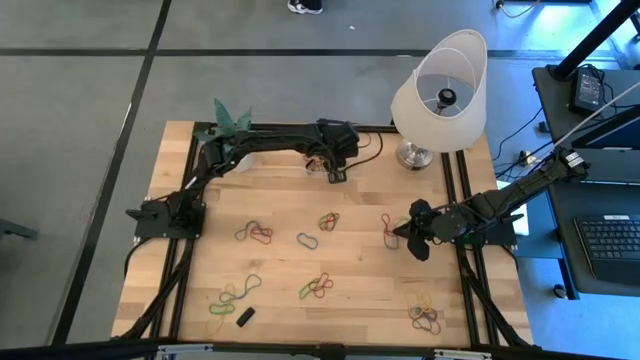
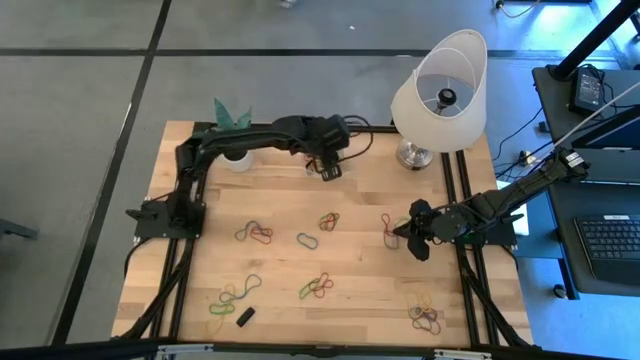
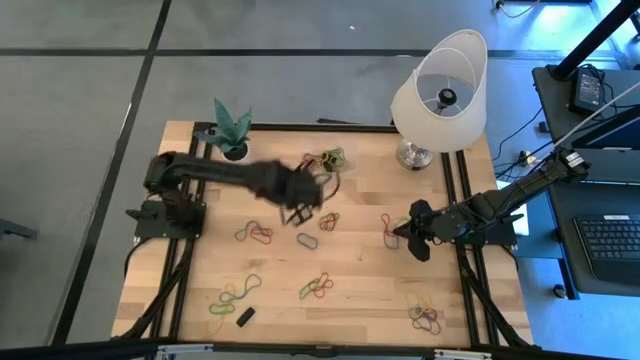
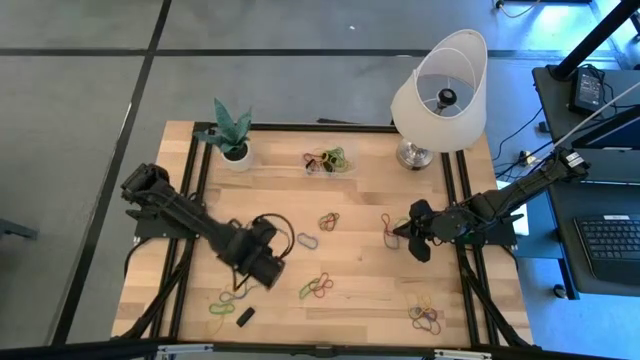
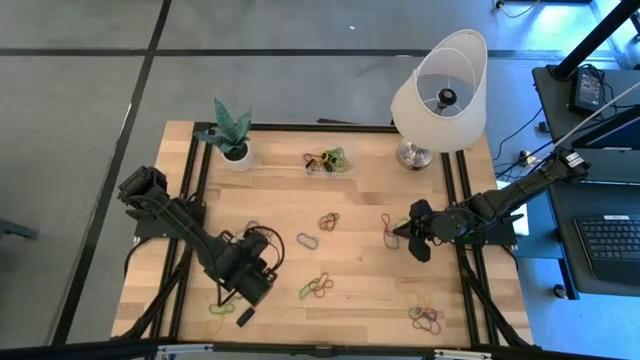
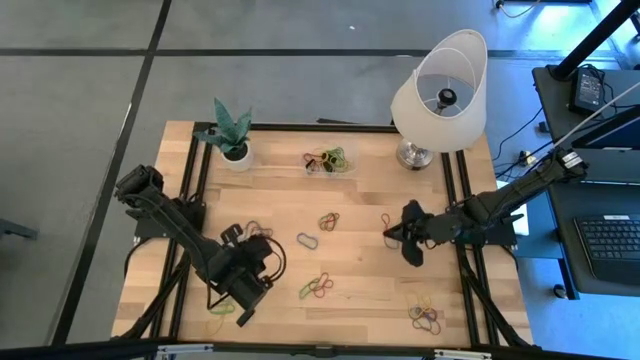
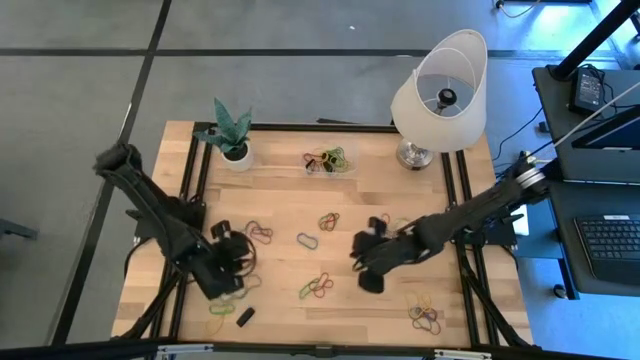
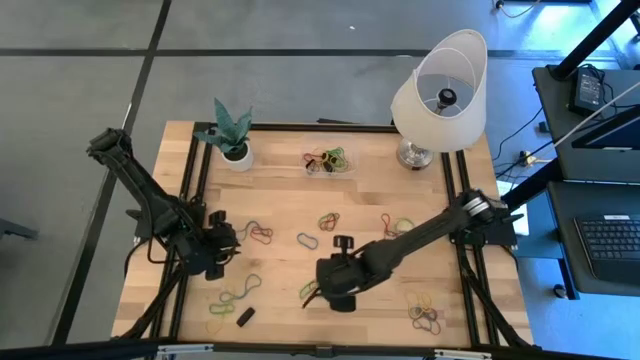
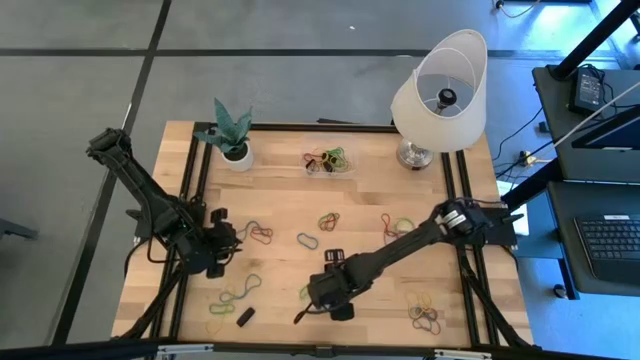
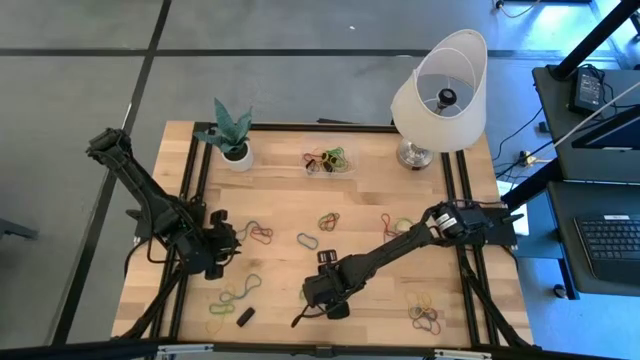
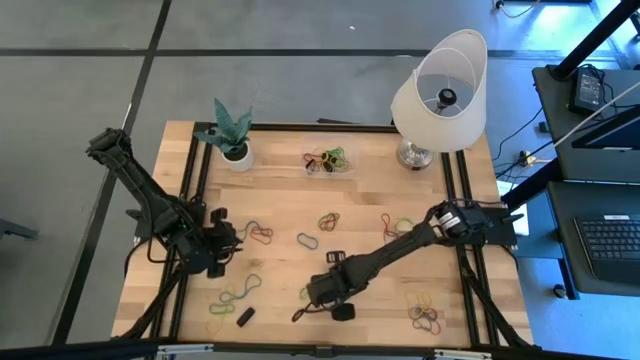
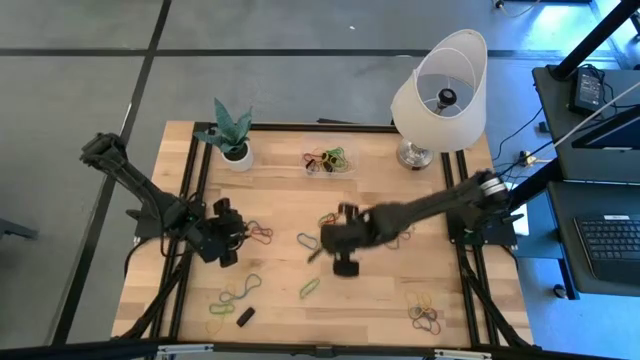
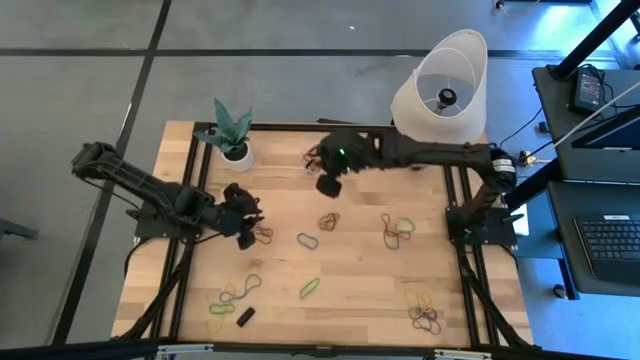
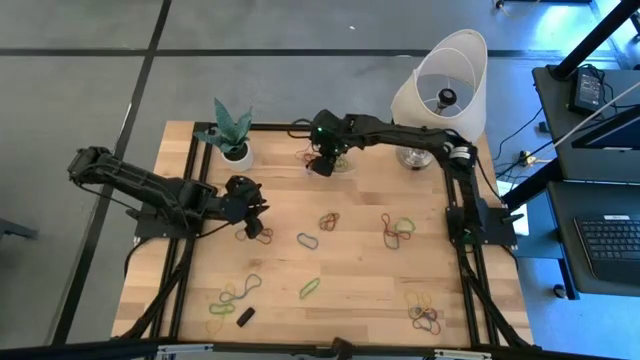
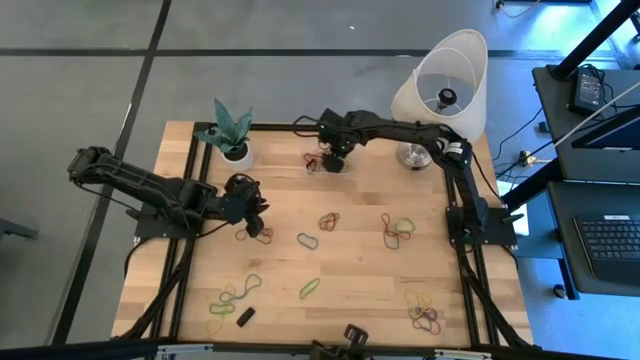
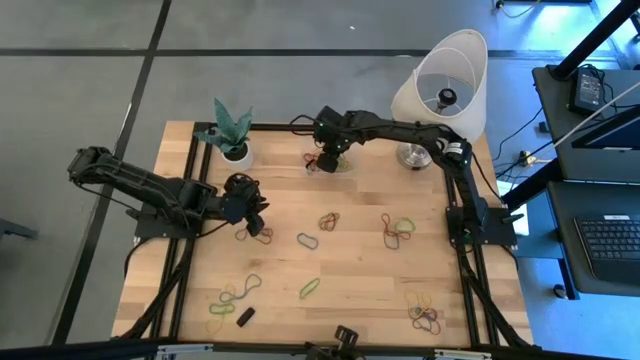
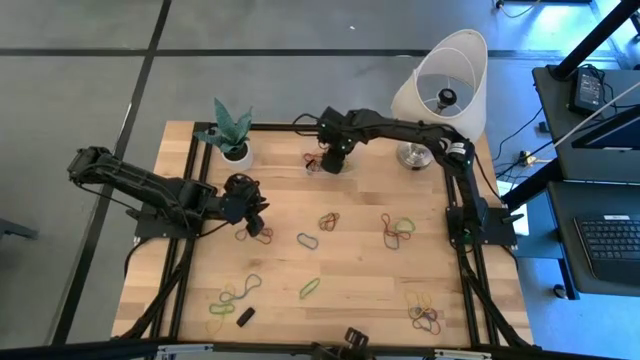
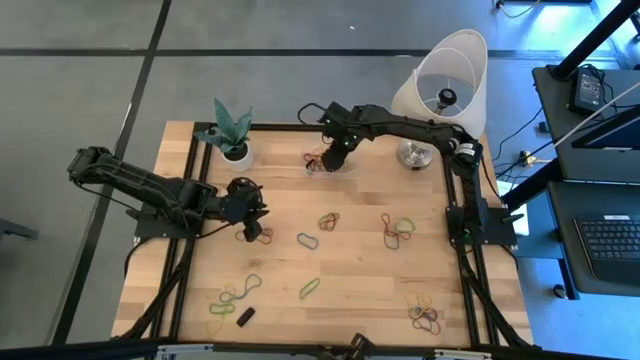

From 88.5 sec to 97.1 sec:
Task: Pick and place rubber bands into bin
Put the red rubber band into the transparent bin

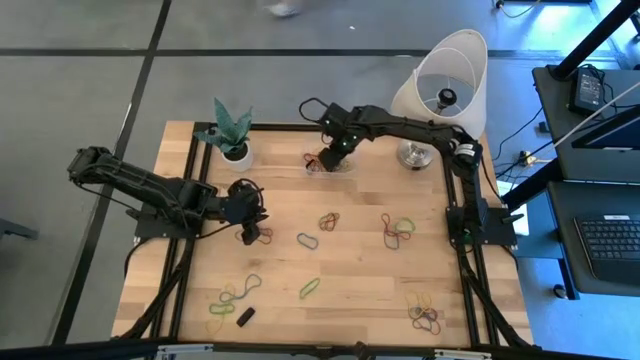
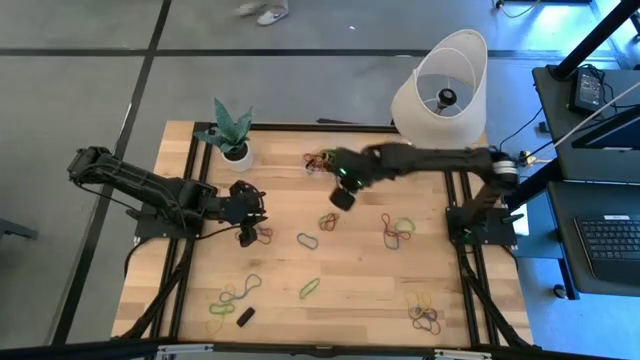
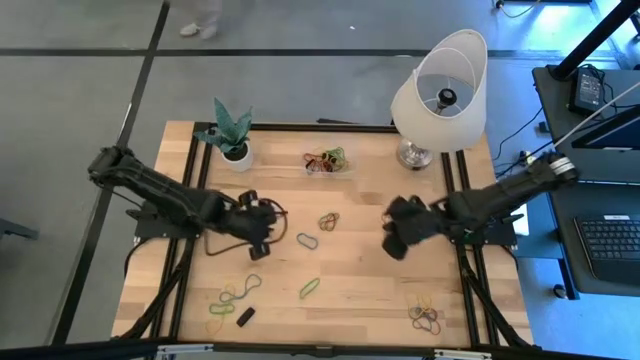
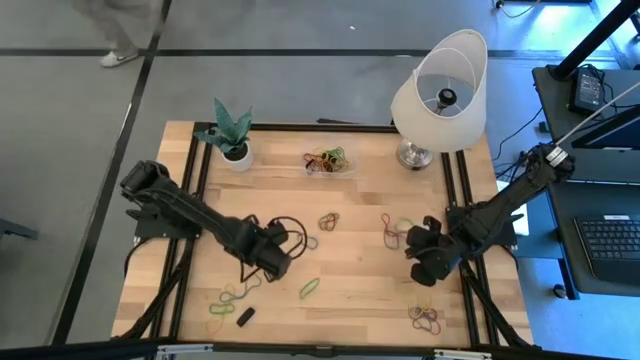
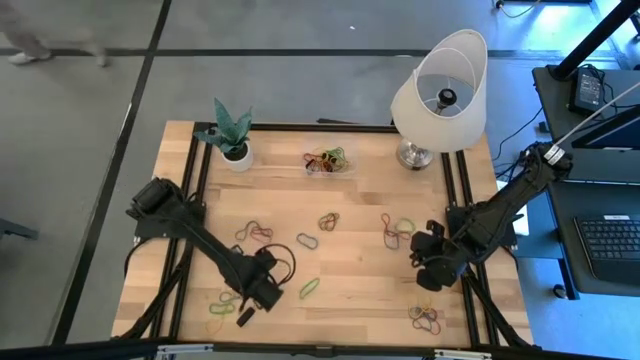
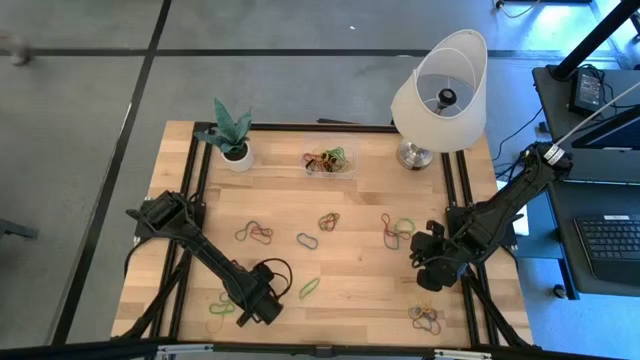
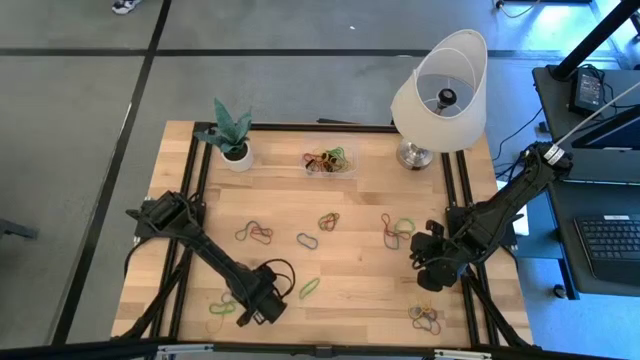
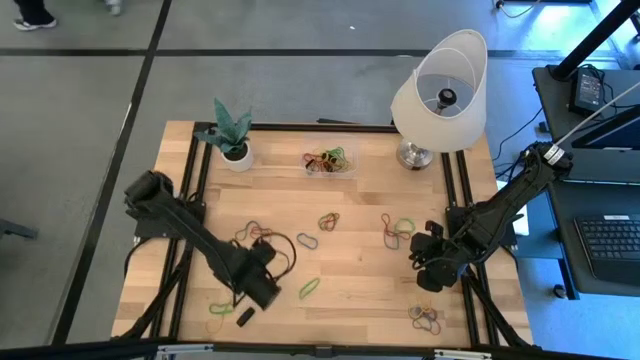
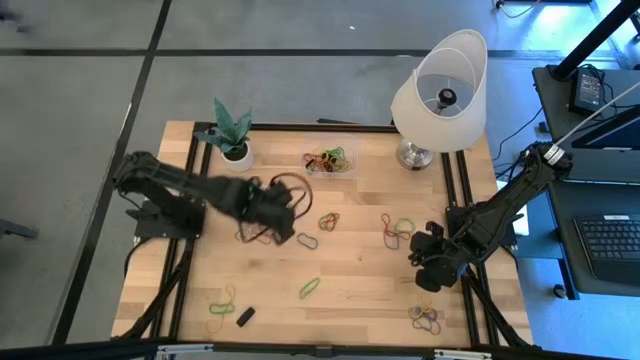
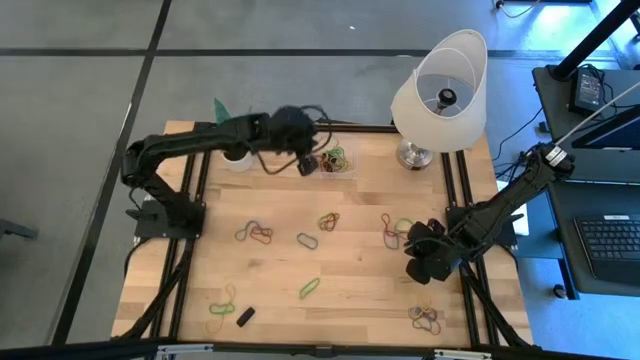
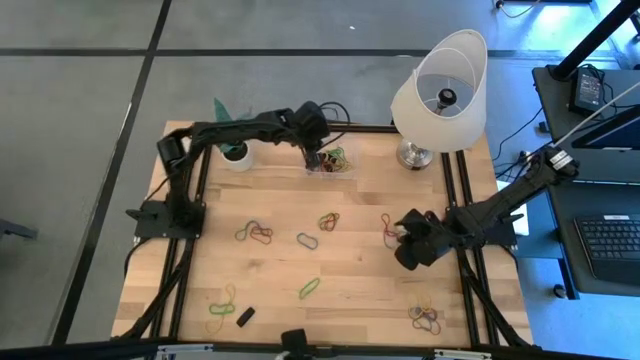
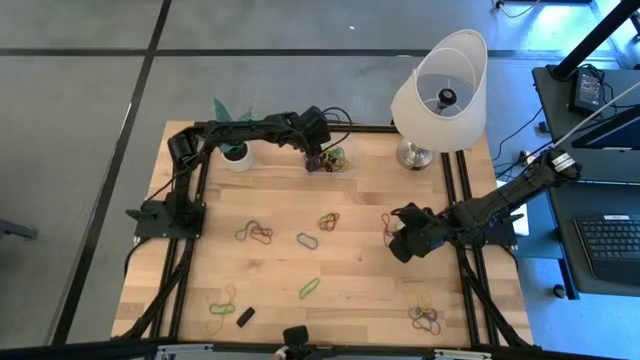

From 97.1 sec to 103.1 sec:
Put the blue rubber band into the transparent bin

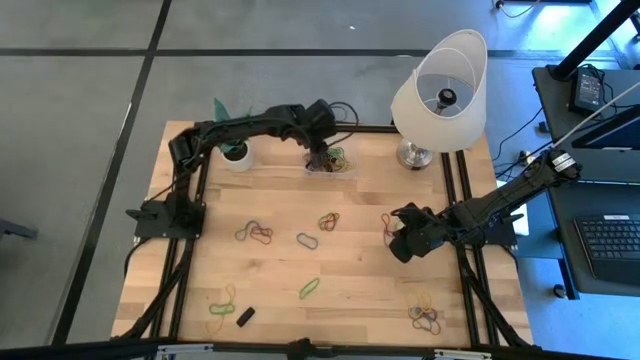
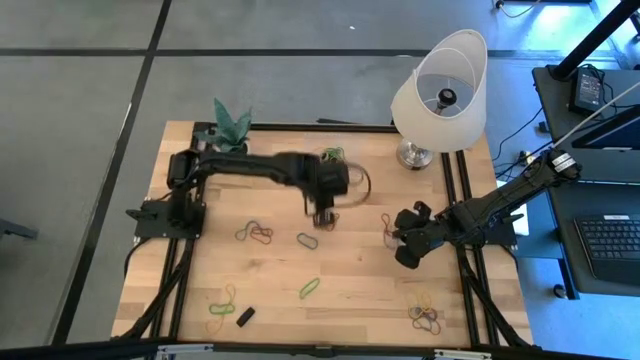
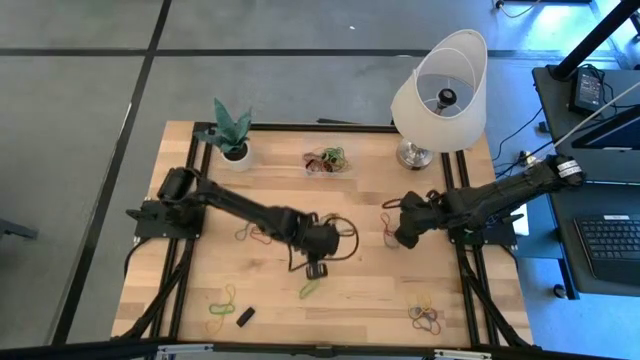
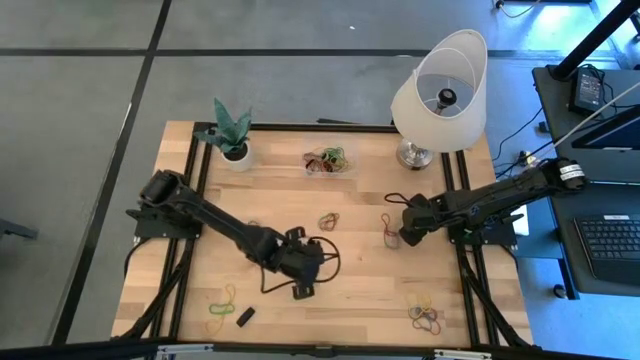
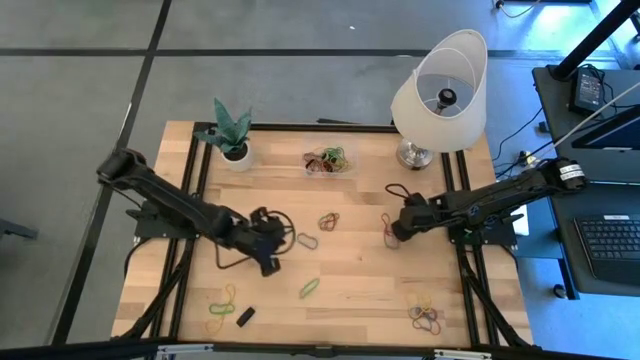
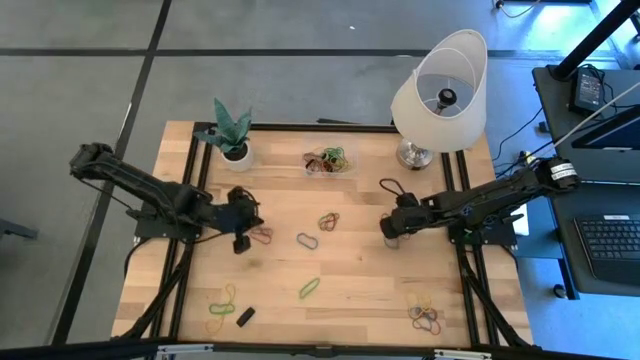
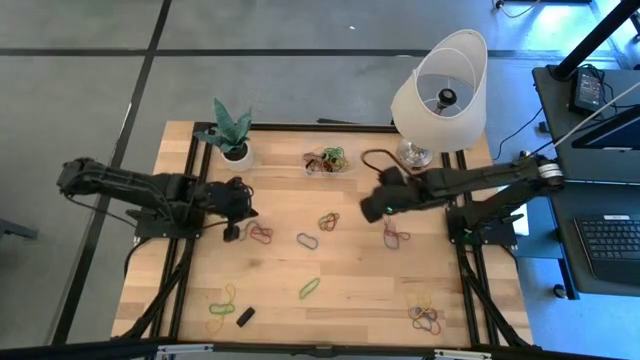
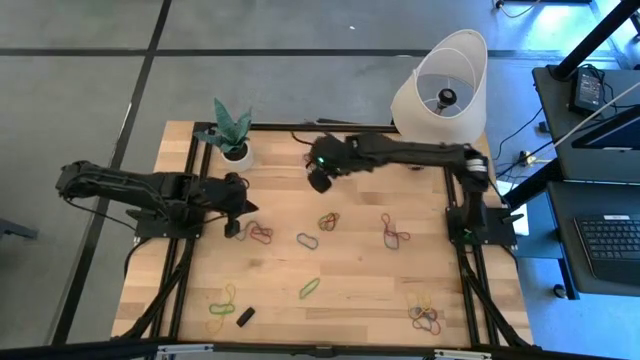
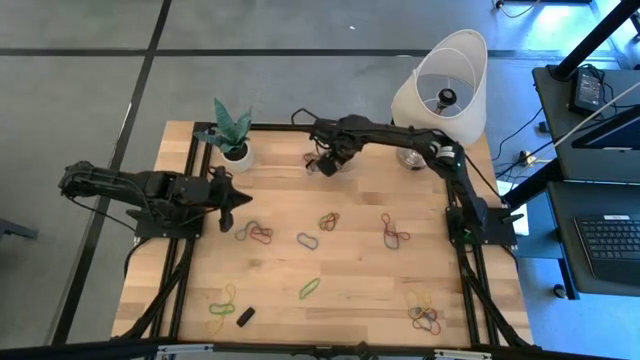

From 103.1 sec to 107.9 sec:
Put the green rubber band into the transparent bin

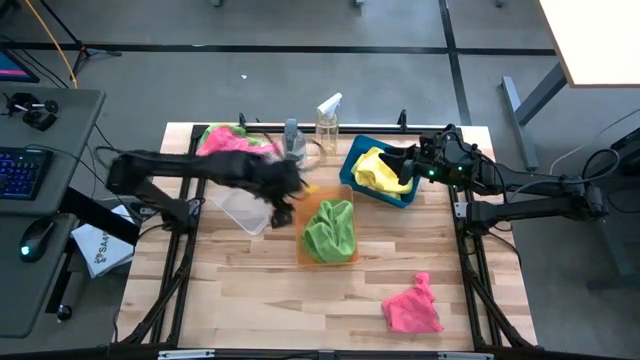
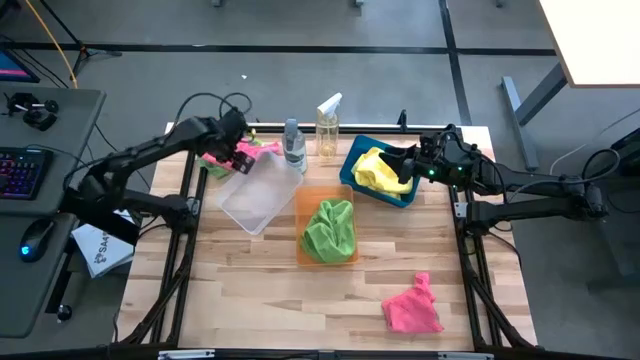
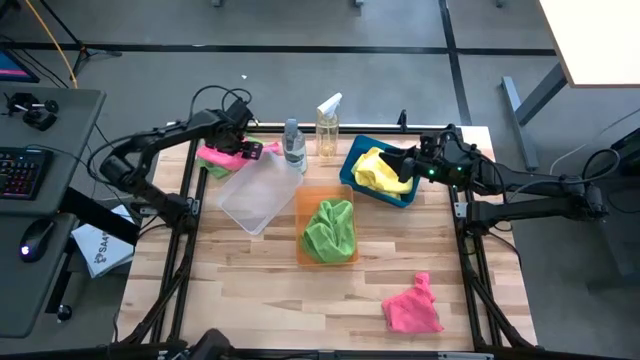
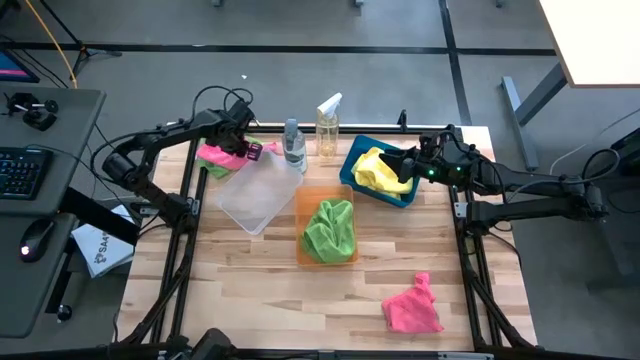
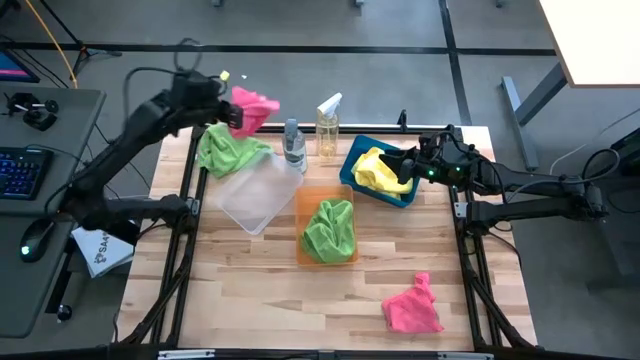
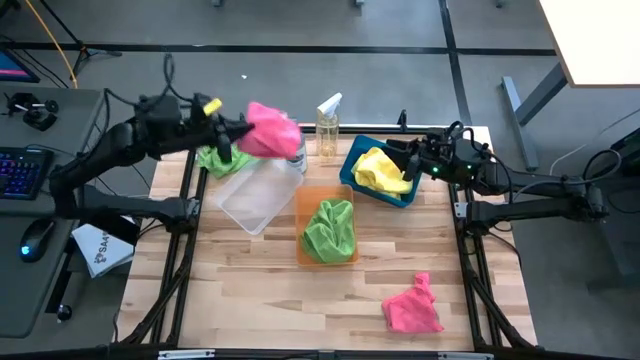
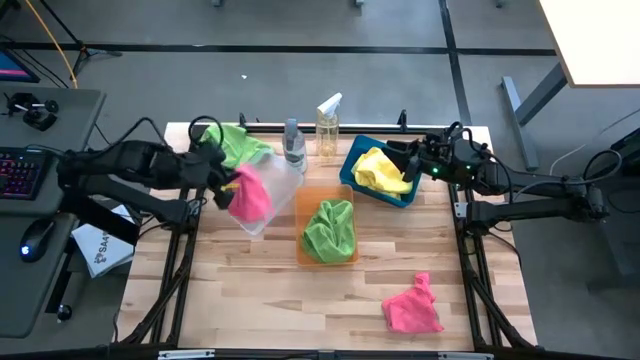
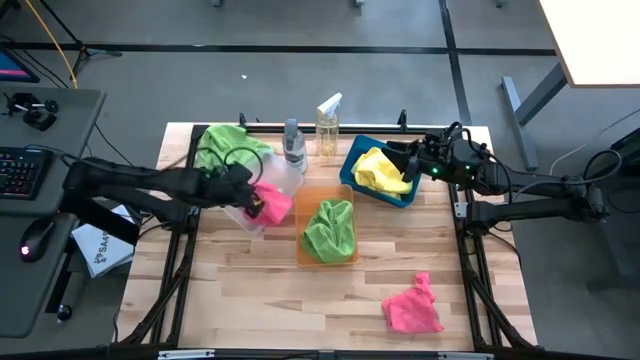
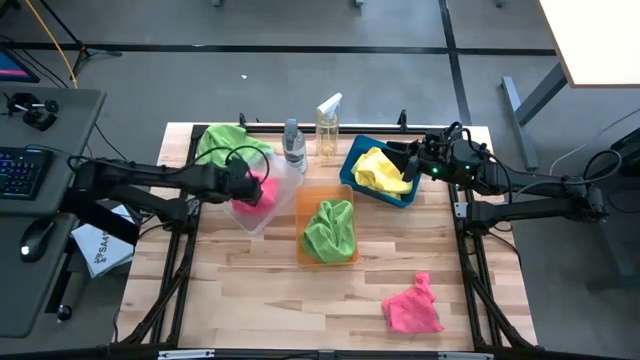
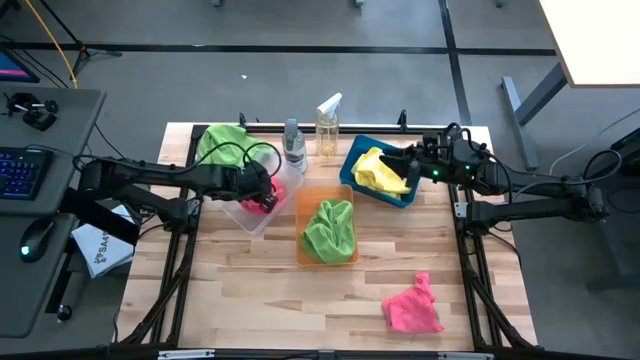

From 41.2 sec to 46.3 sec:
Task: Sort microfiber towel by color & place in baskets
Put the top pink microfiber towel into the transparent bin
